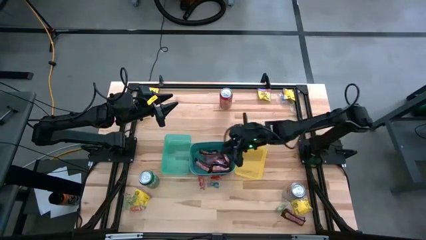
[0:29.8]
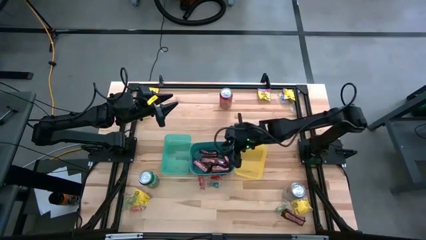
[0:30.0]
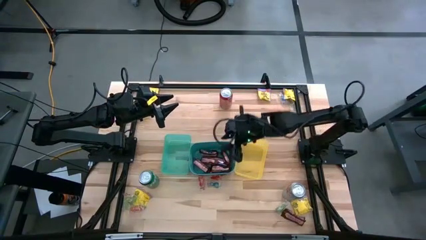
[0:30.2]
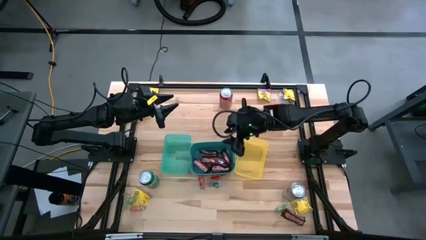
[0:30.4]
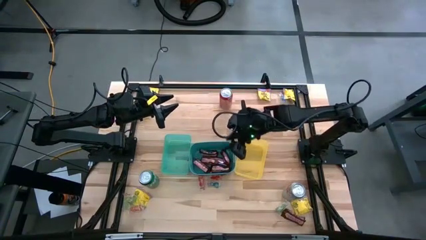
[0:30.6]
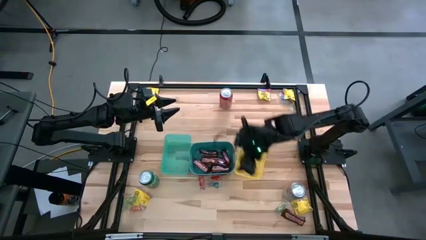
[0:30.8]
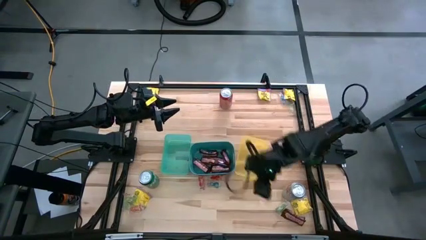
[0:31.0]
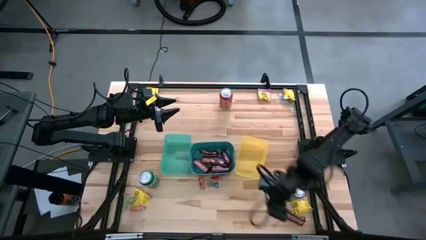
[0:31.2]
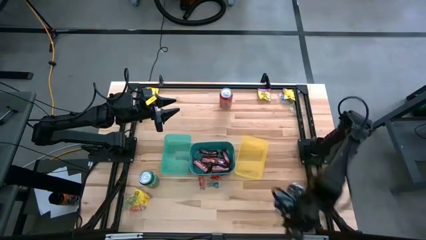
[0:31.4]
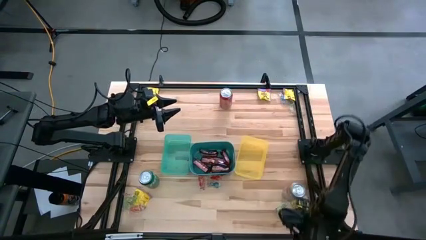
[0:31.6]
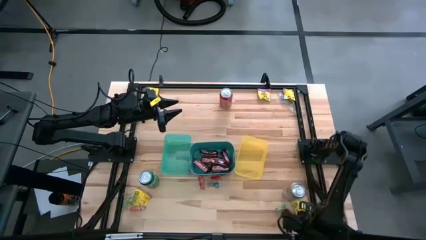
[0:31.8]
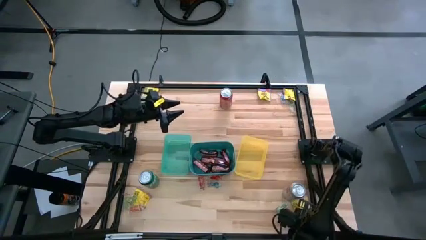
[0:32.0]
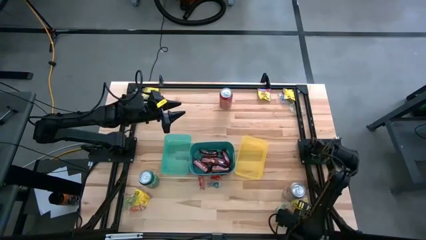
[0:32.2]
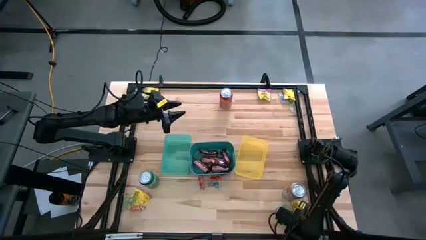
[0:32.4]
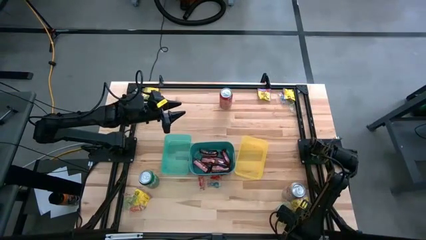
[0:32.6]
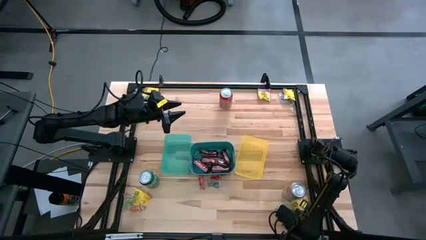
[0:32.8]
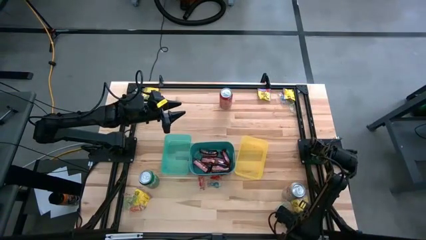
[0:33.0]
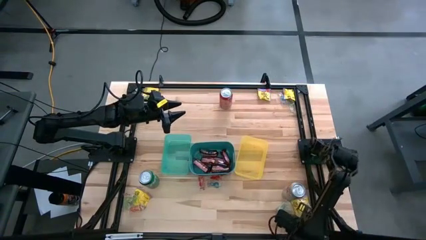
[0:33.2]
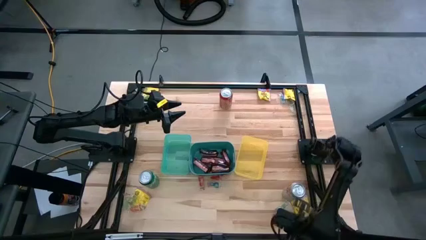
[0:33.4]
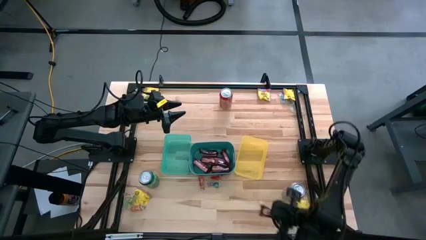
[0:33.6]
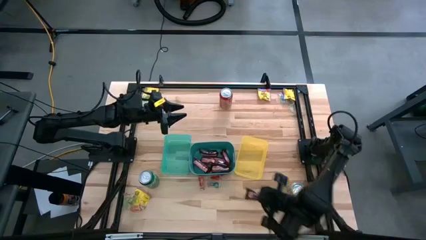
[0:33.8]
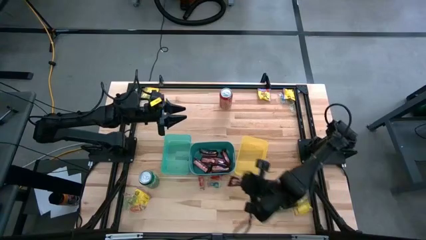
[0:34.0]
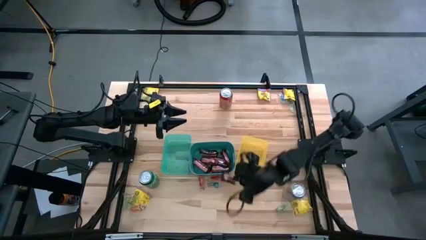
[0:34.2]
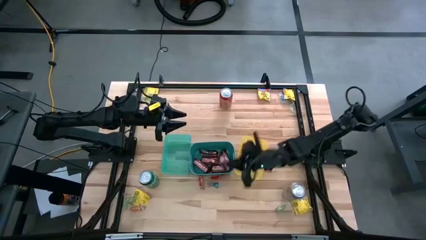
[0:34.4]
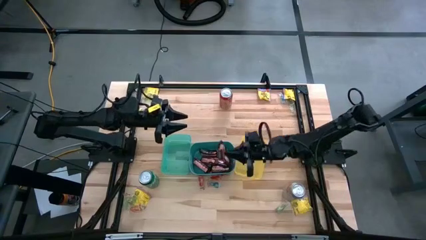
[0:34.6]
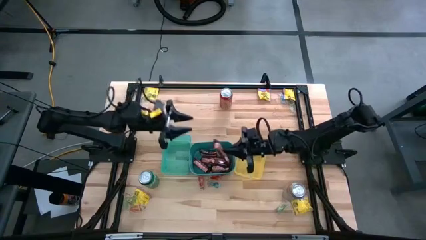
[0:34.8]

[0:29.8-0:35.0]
Task: Sort candy
Put the chocolate bar into the blue bin

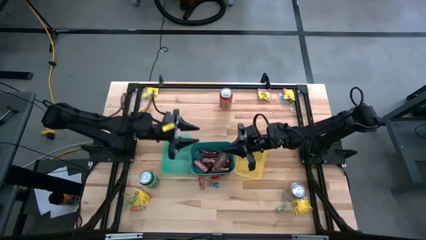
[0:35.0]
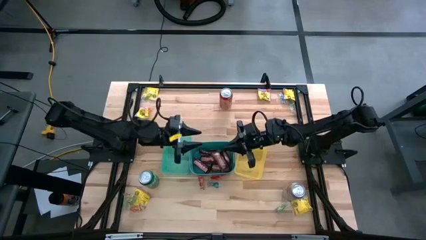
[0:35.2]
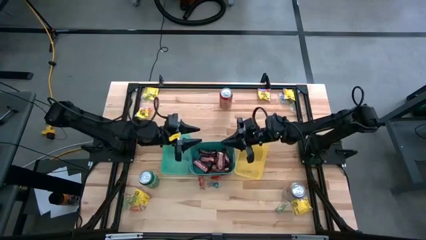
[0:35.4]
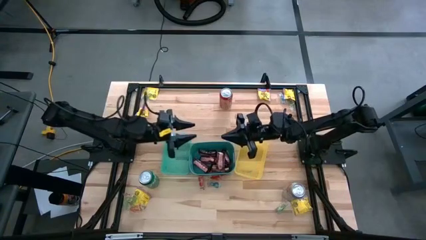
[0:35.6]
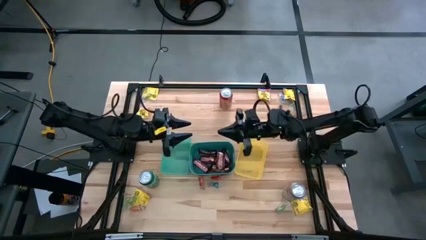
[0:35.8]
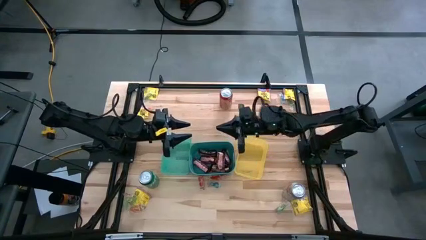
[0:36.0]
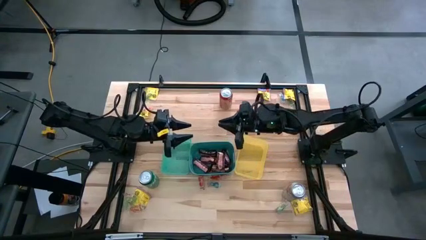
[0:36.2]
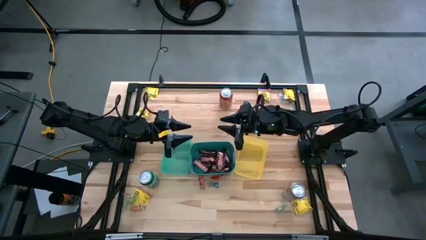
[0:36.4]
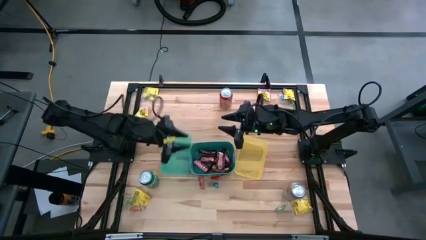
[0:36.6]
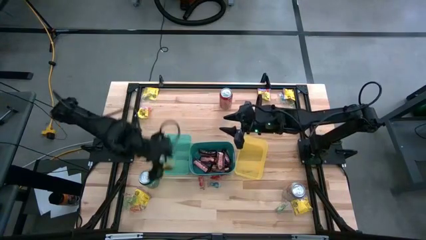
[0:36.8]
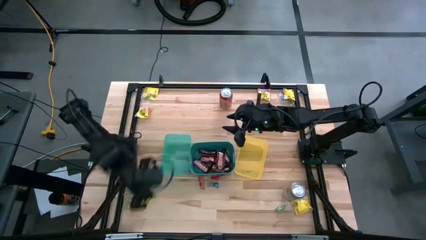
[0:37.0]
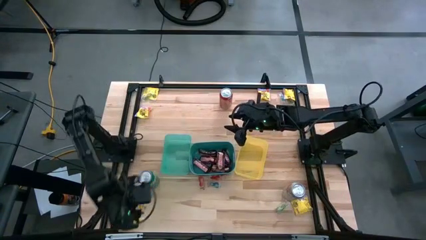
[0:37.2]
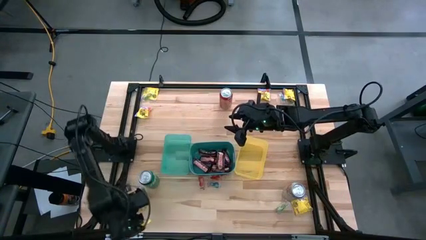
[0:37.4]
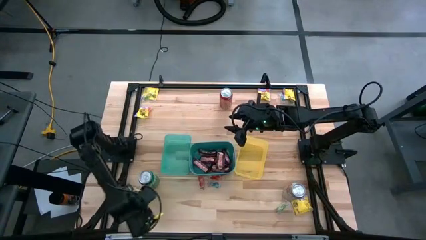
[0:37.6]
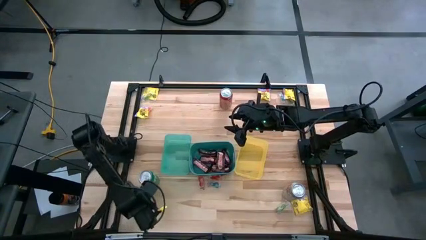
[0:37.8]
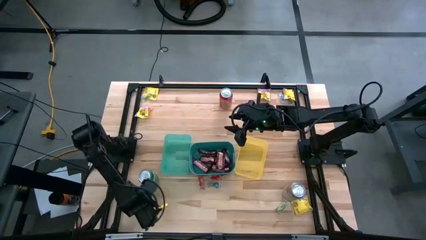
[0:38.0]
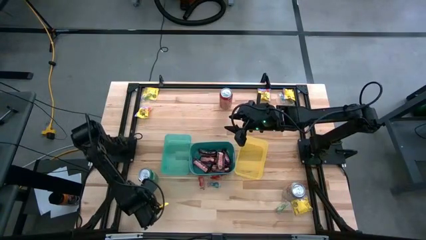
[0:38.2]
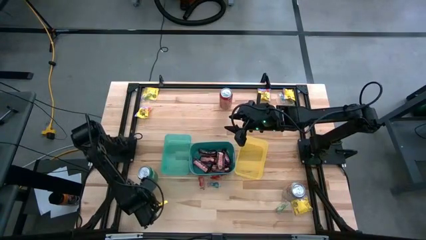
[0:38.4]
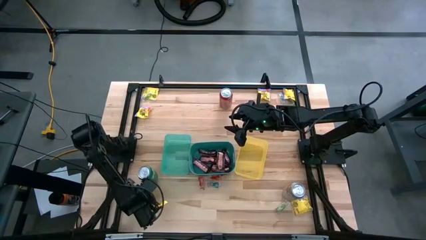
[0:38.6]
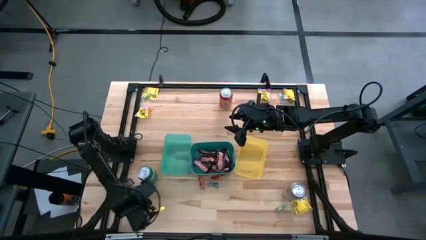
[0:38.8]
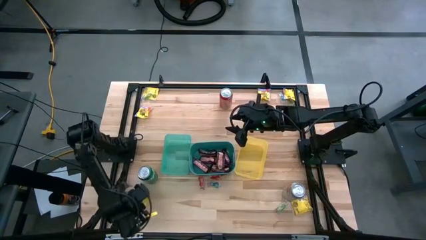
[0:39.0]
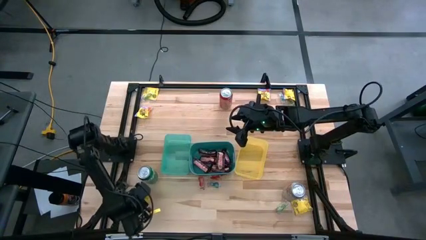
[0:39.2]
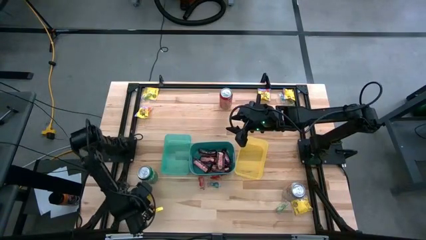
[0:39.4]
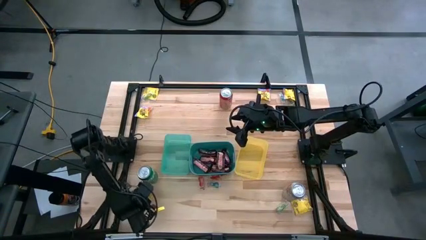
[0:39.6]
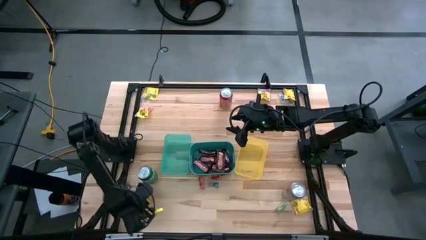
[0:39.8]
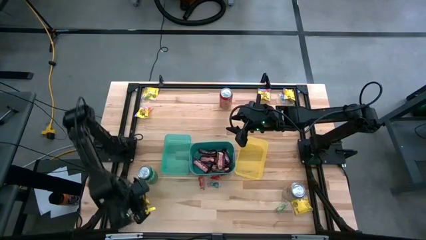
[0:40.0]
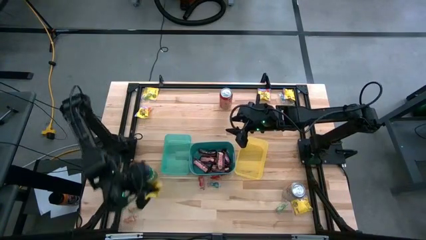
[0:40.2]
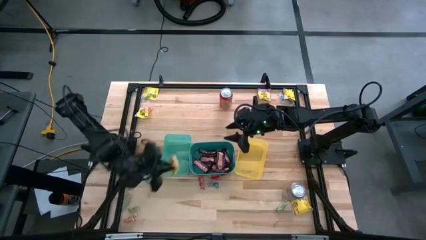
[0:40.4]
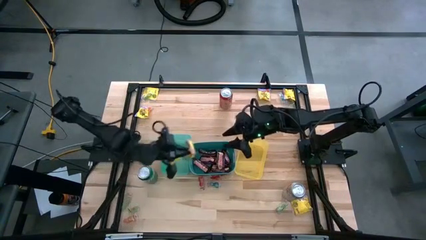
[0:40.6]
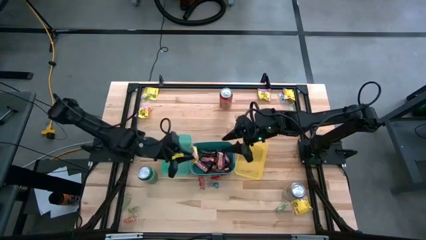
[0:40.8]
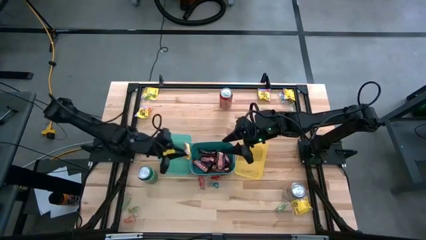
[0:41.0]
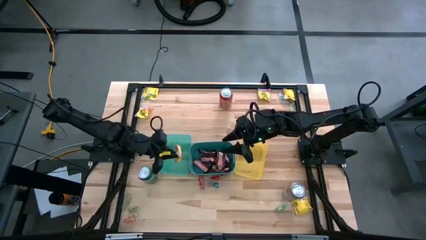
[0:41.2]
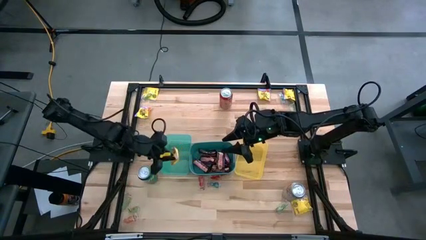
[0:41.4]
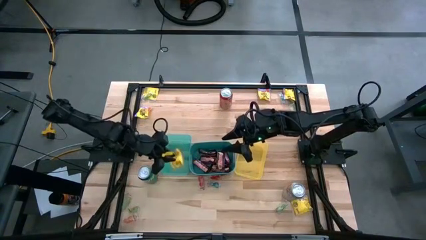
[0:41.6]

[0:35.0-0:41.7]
Put the yellow candy into the green bin

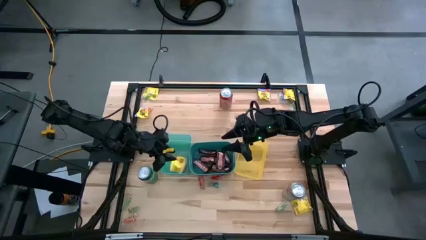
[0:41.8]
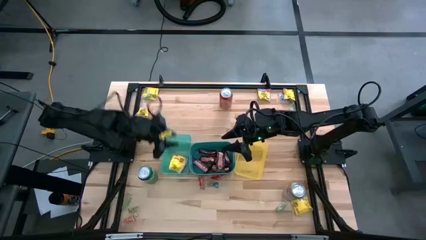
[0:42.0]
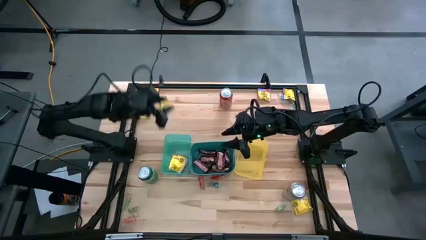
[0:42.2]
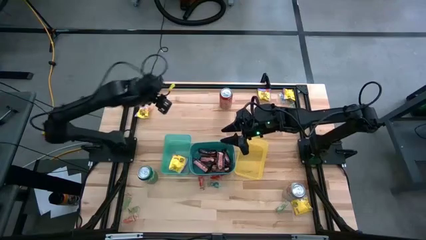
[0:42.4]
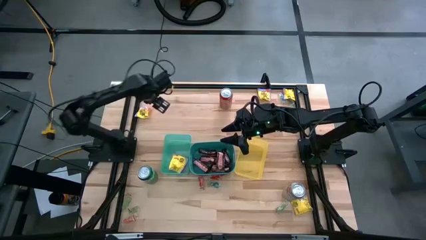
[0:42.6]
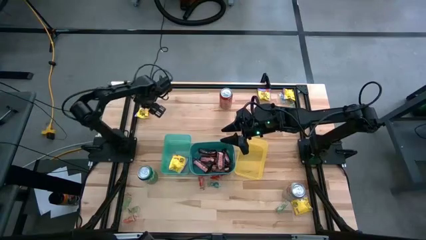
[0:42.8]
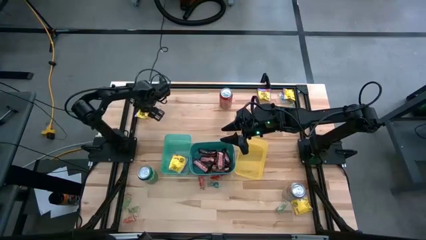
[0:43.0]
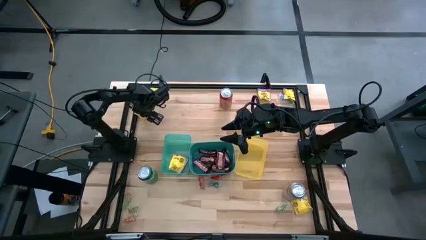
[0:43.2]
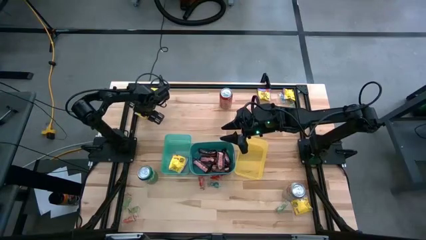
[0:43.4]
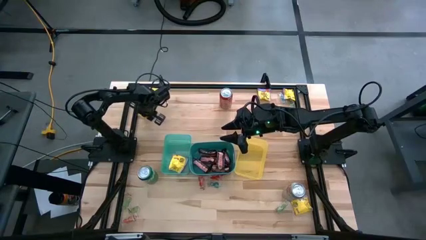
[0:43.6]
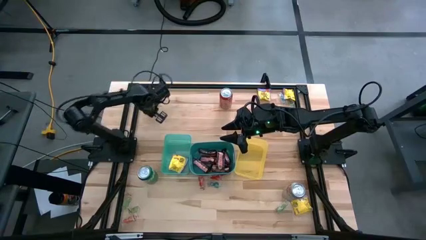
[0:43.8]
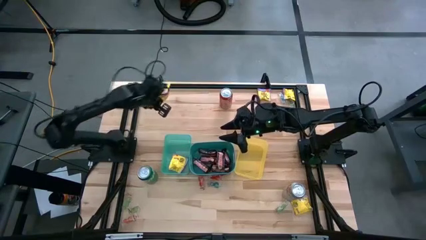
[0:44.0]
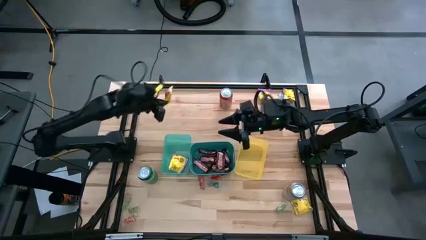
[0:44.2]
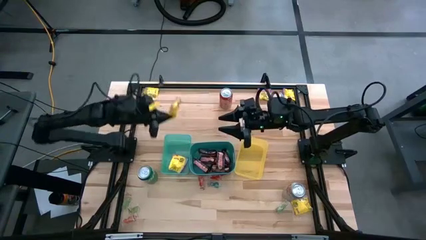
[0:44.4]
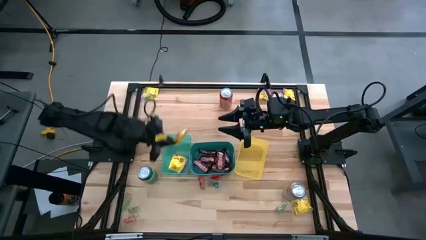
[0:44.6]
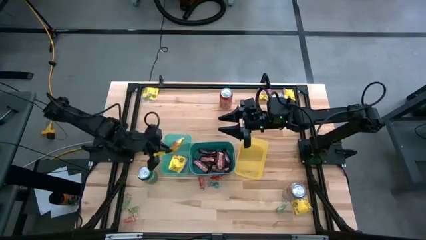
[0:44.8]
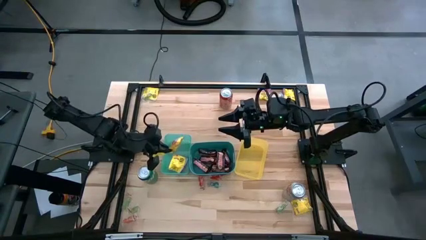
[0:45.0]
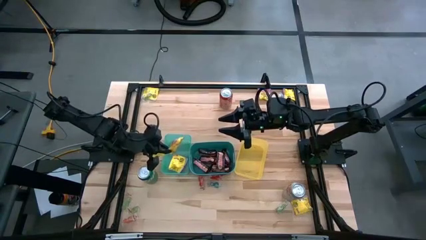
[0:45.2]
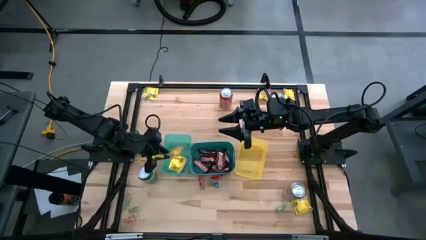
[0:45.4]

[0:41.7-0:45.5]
Put the yellow candy into the green bin

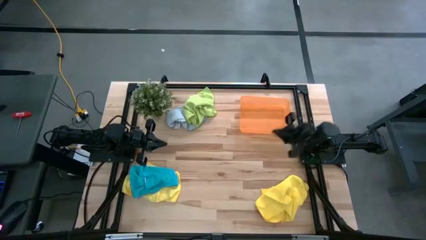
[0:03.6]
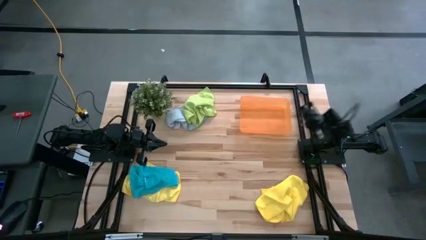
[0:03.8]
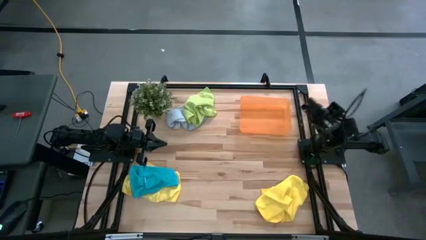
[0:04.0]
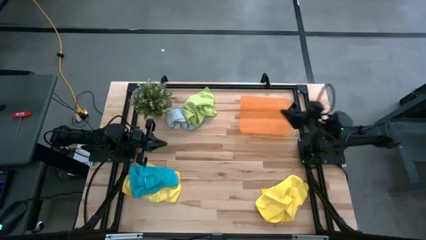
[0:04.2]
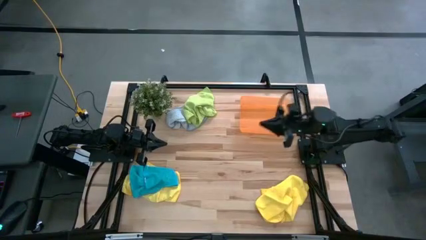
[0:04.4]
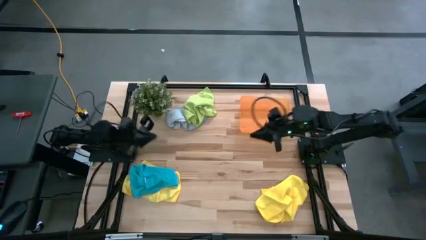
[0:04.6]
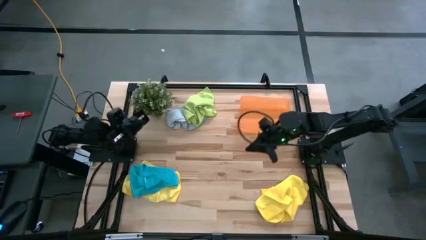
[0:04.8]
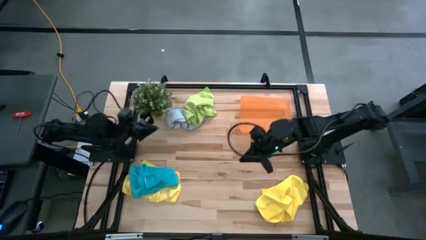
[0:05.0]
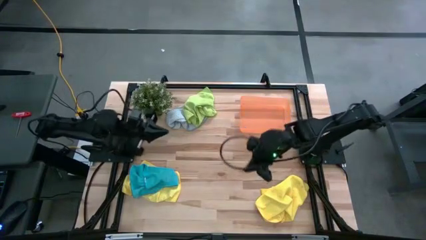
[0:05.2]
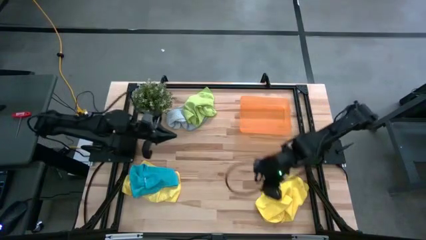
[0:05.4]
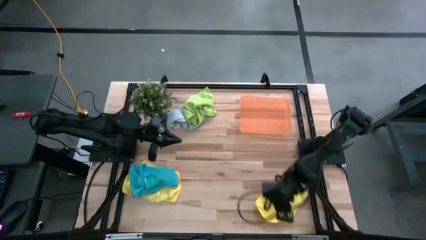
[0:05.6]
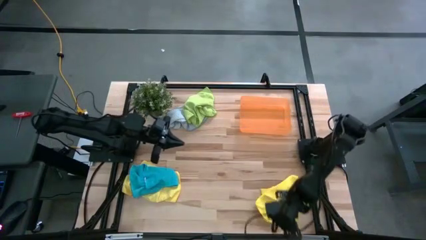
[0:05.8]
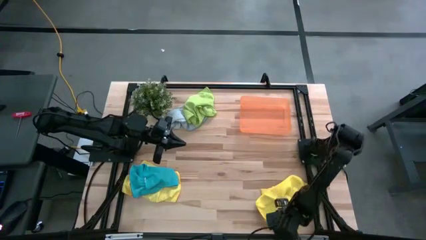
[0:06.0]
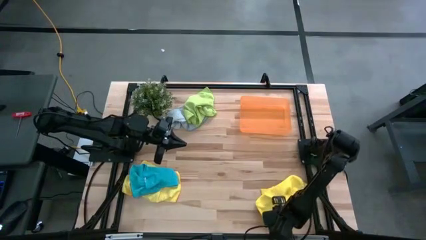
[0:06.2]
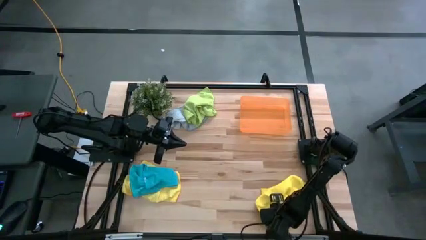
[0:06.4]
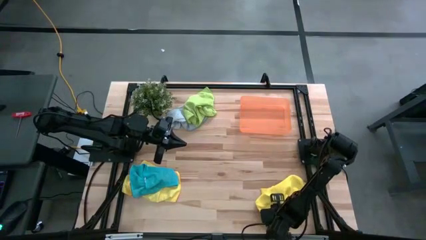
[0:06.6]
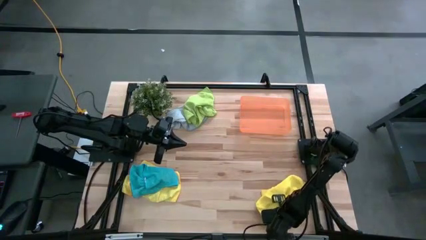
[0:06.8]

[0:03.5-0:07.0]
Task: Fold microfiber towels
Fold the right yellow microfiber cloth
